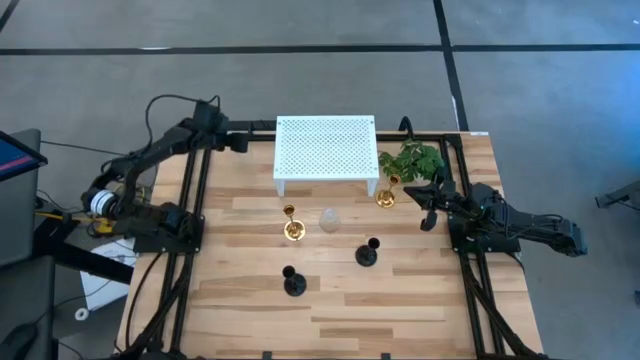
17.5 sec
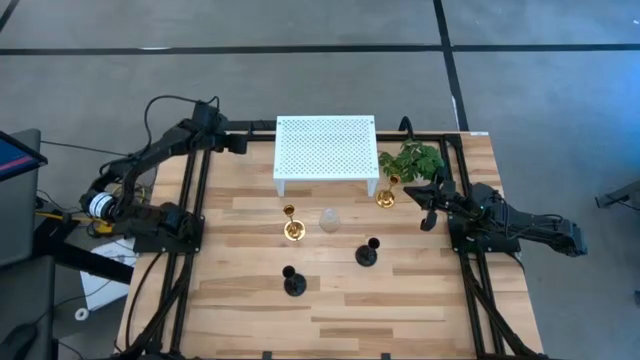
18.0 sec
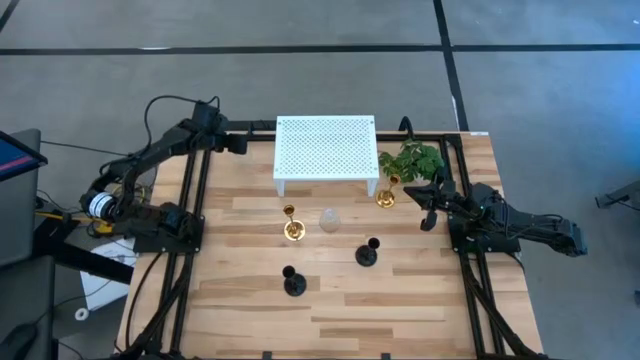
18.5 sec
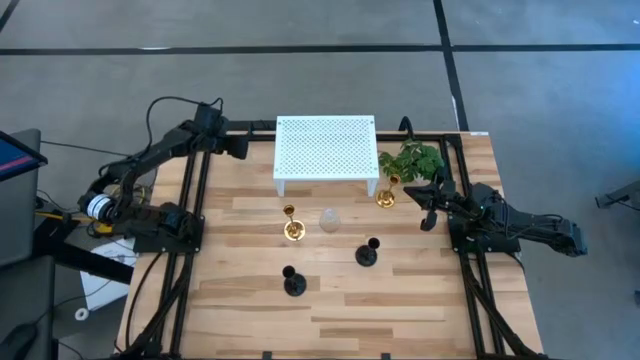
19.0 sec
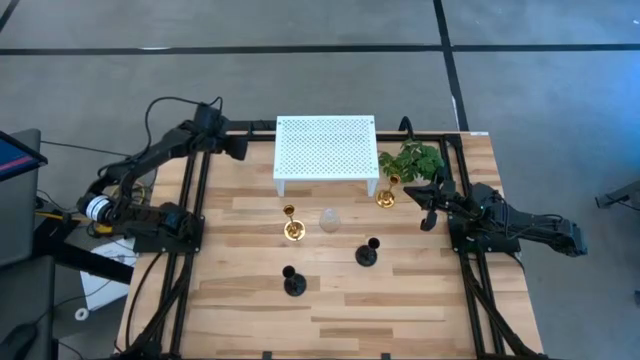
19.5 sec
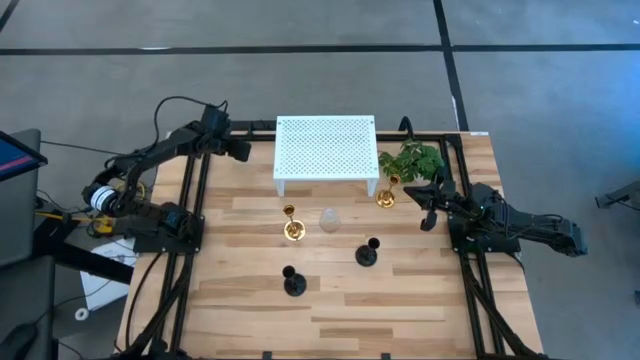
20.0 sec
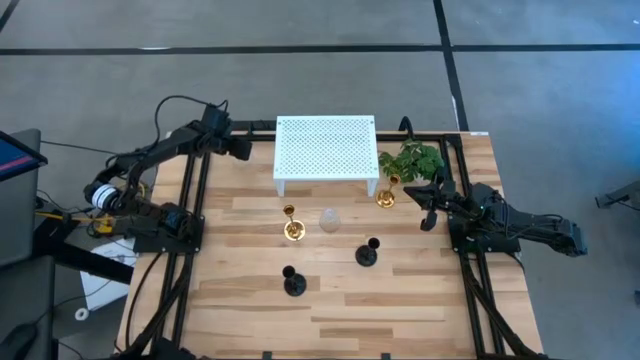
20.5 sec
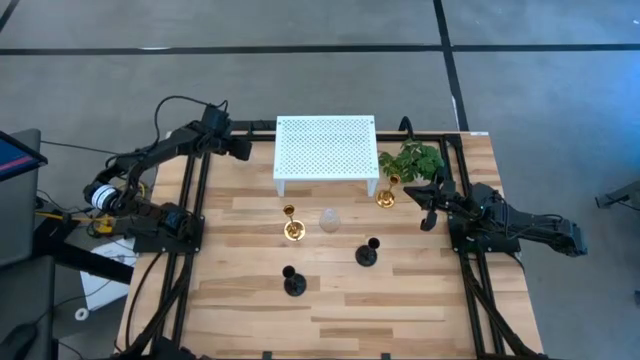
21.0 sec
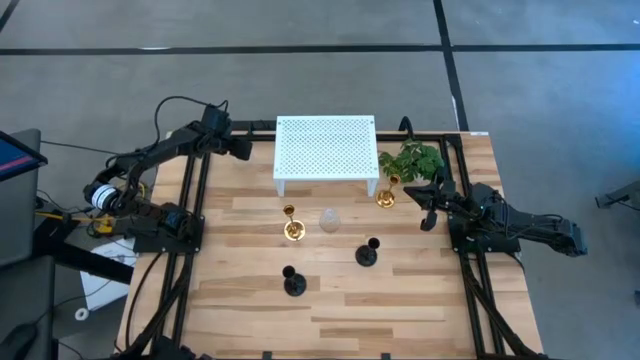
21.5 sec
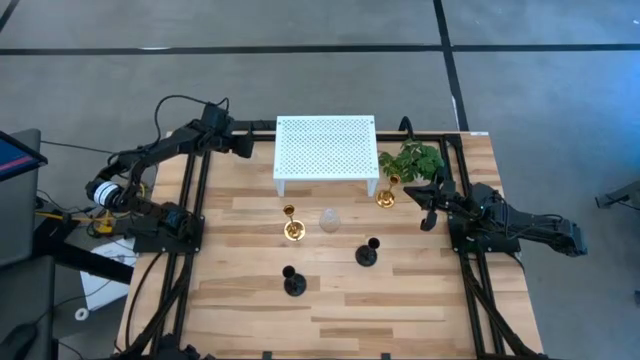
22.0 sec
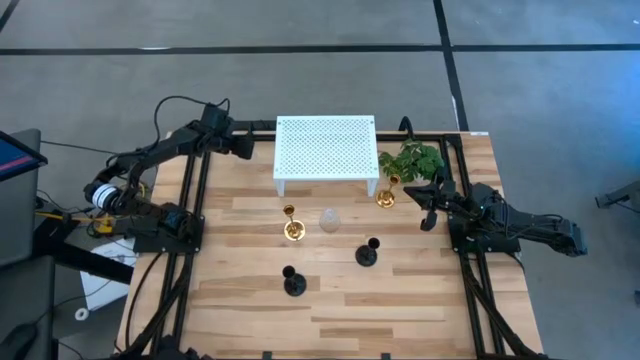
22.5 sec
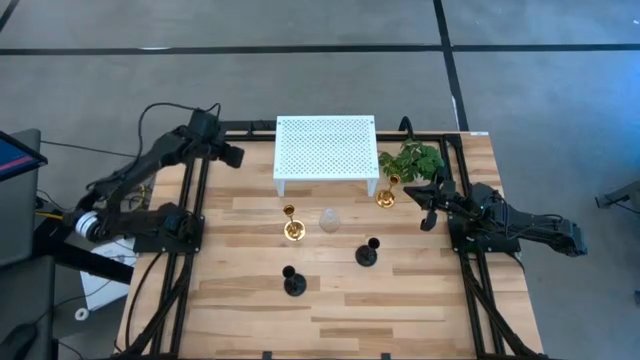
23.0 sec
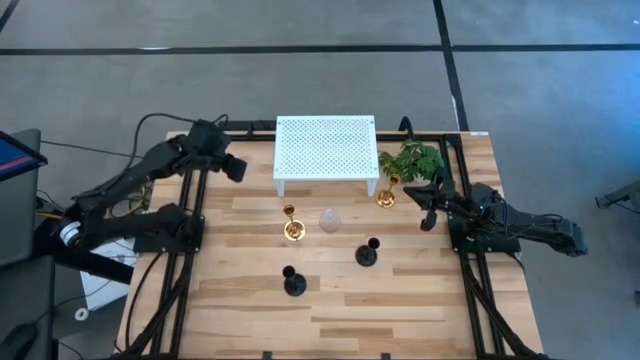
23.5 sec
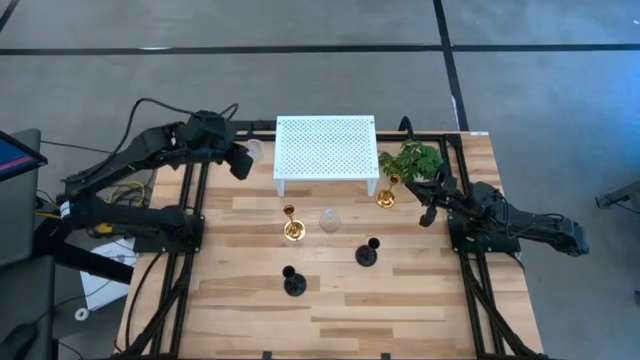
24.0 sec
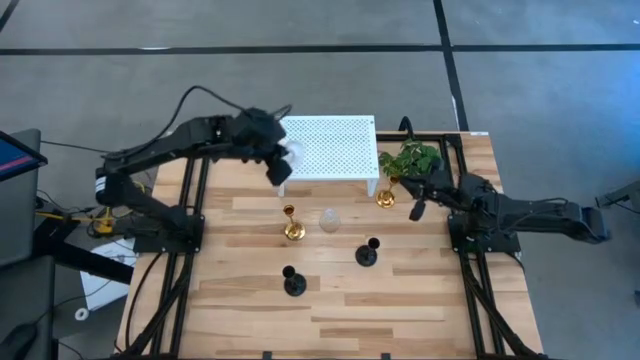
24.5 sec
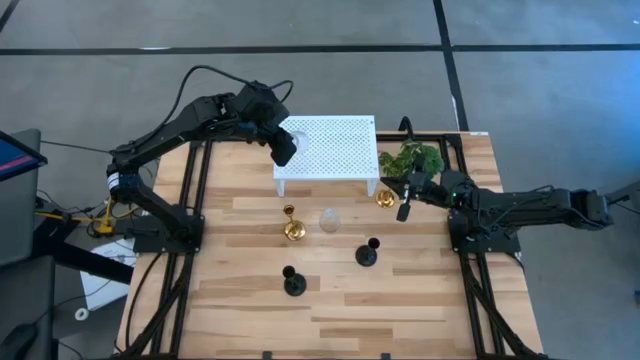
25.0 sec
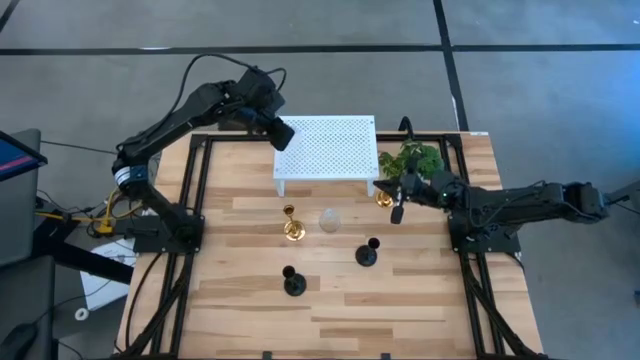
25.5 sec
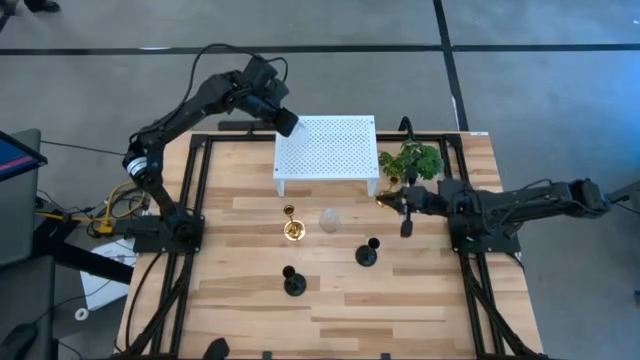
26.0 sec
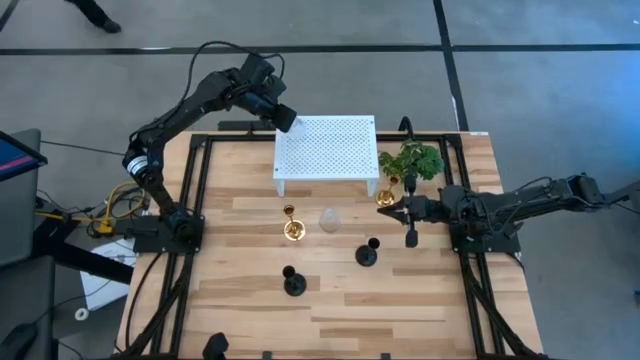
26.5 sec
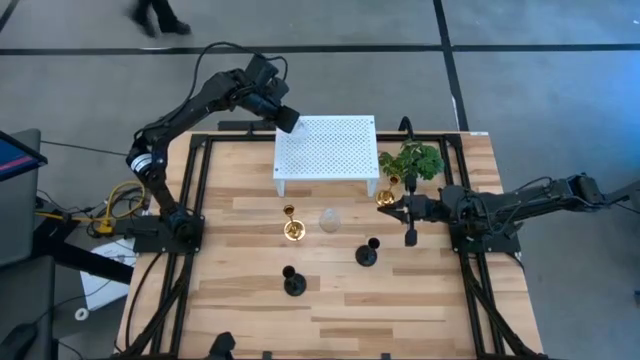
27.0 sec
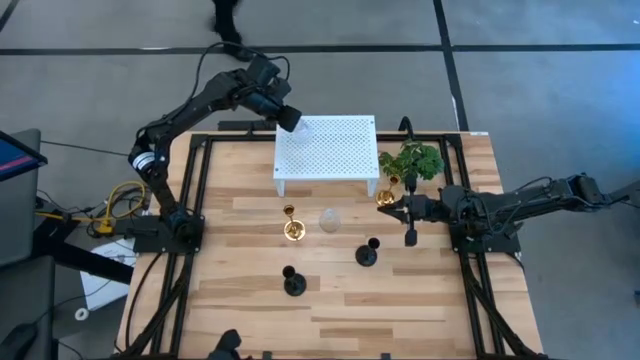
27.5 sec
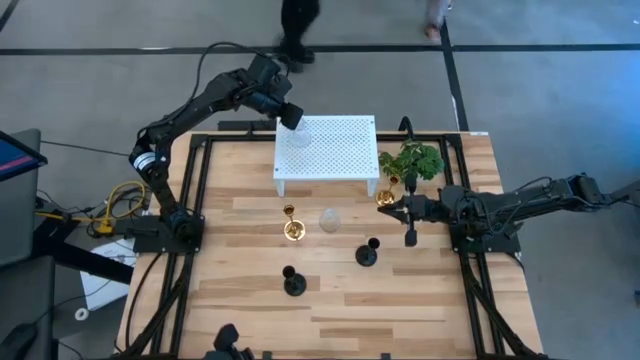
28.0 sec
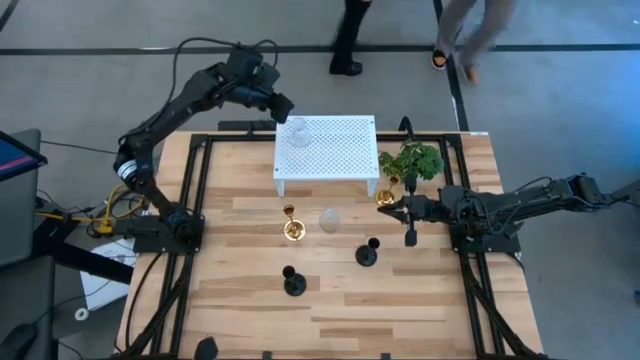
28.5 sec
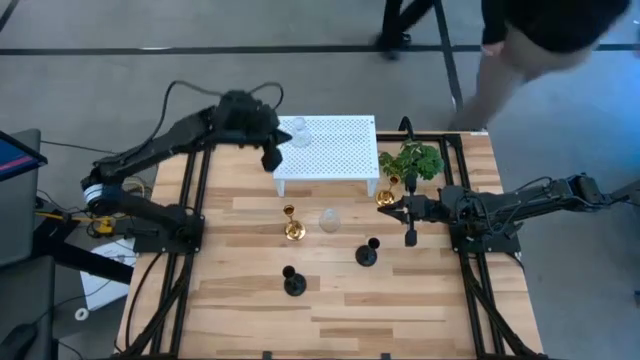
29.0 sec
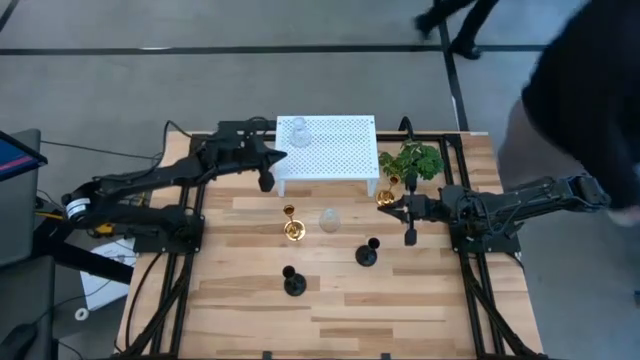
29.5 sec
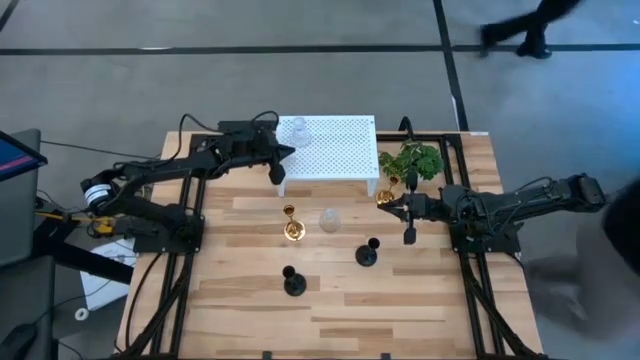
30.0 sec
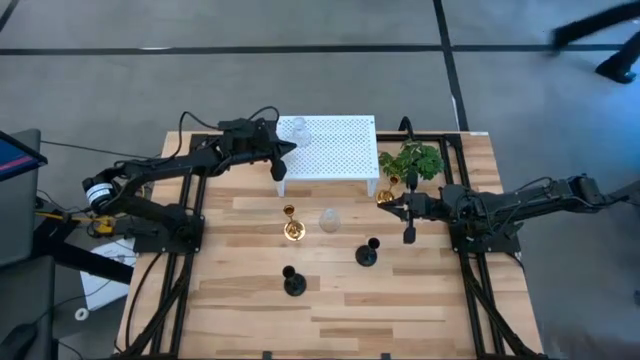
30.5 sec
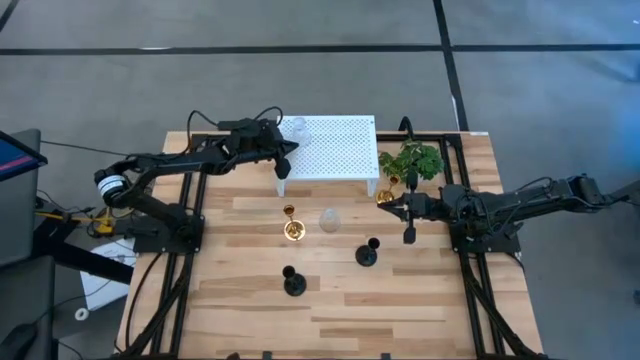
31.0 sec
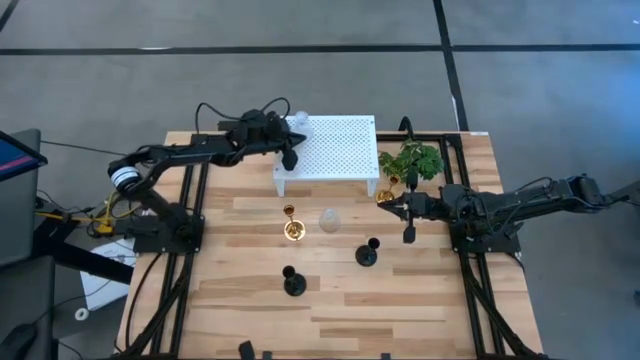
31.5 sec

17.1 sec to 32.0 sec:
Task: Pick & Place candle stick holders
Put the top transparent candle holder on the shelf

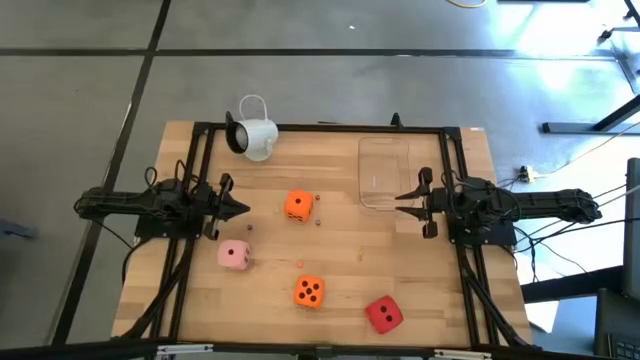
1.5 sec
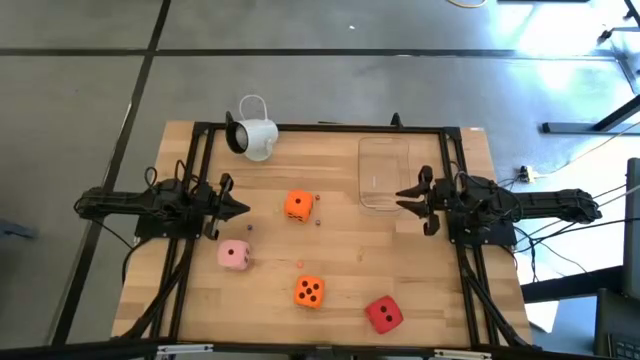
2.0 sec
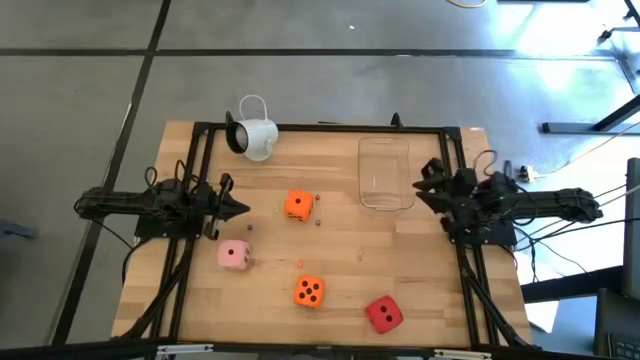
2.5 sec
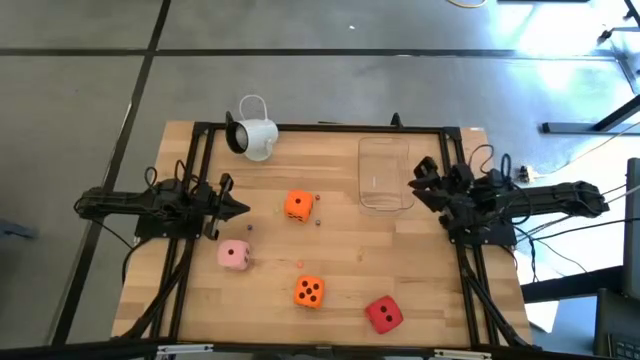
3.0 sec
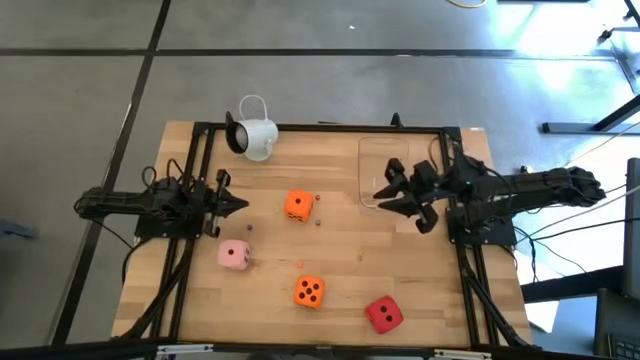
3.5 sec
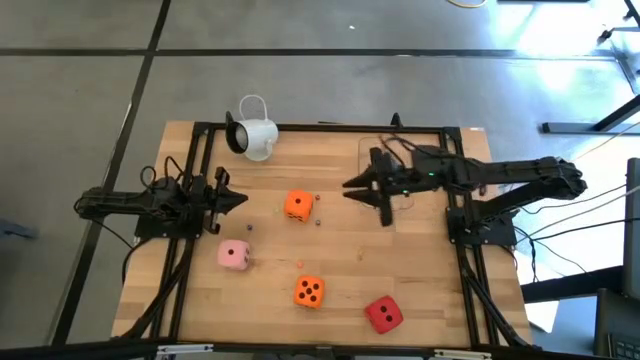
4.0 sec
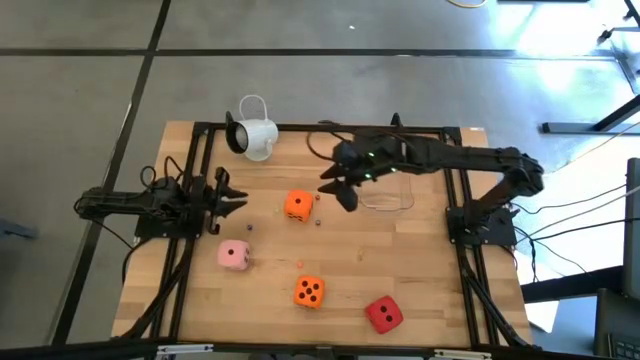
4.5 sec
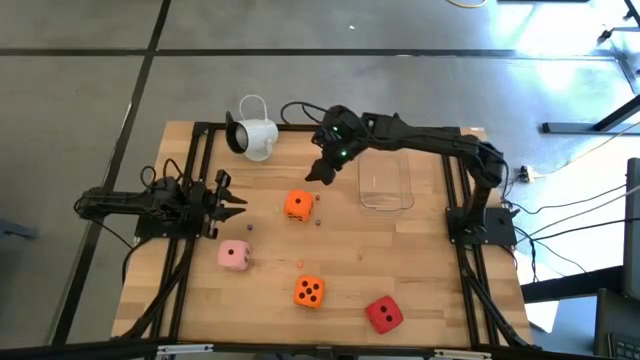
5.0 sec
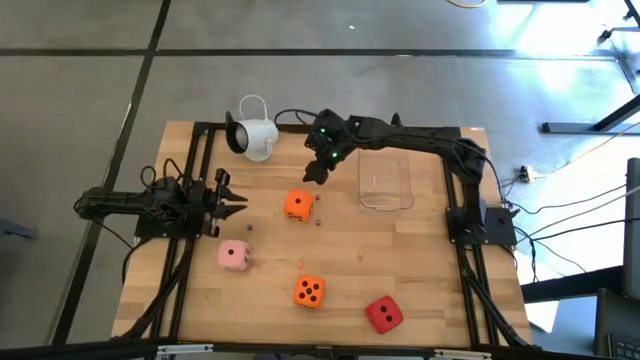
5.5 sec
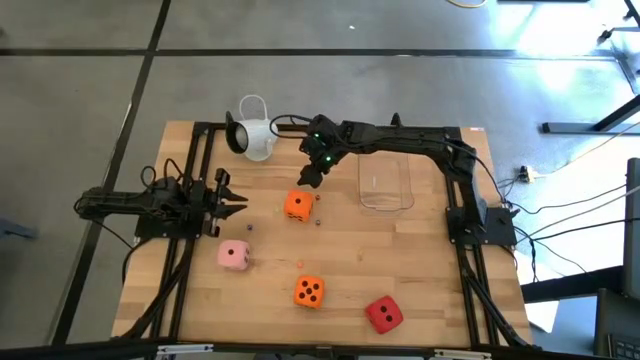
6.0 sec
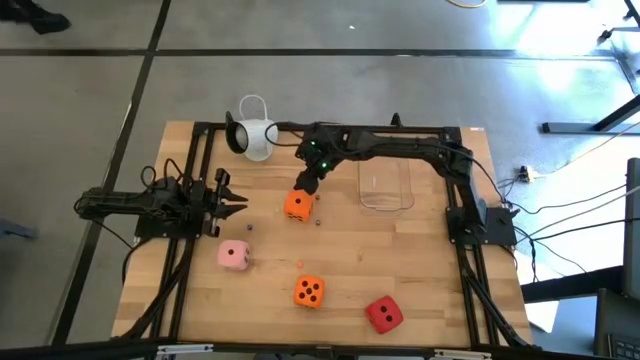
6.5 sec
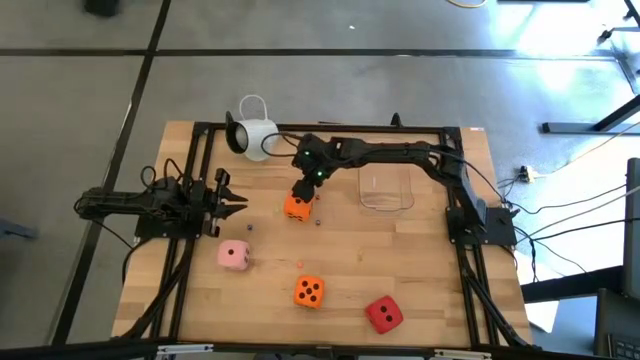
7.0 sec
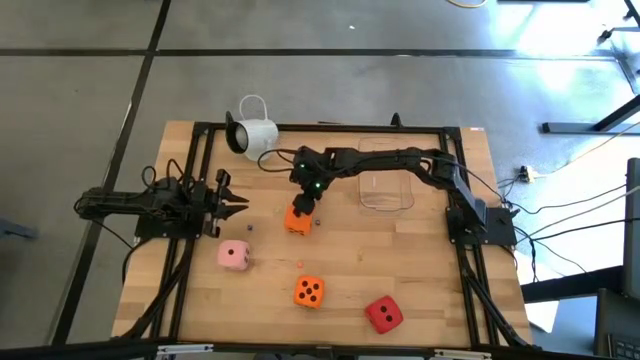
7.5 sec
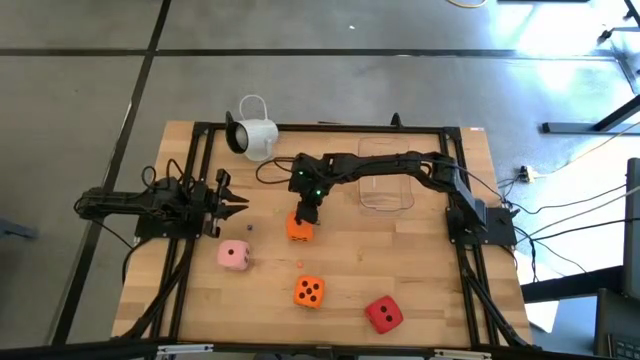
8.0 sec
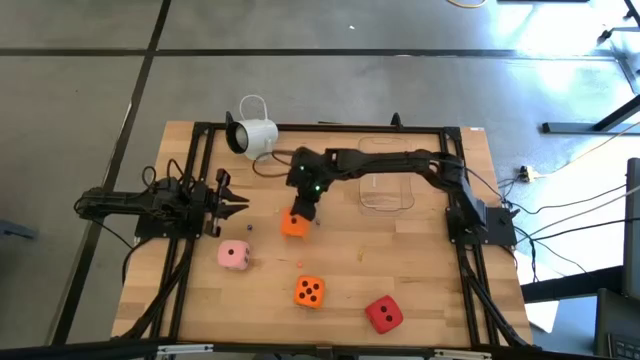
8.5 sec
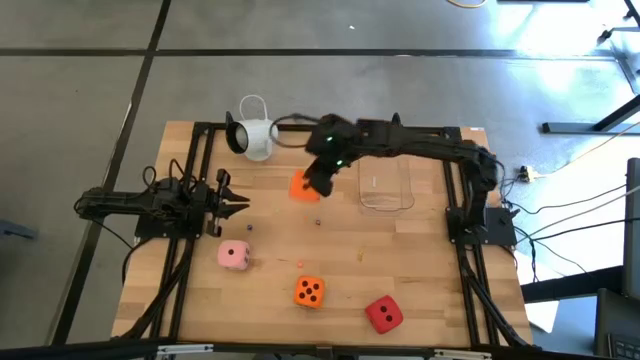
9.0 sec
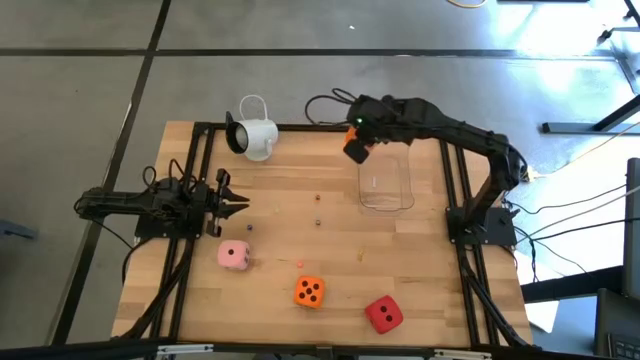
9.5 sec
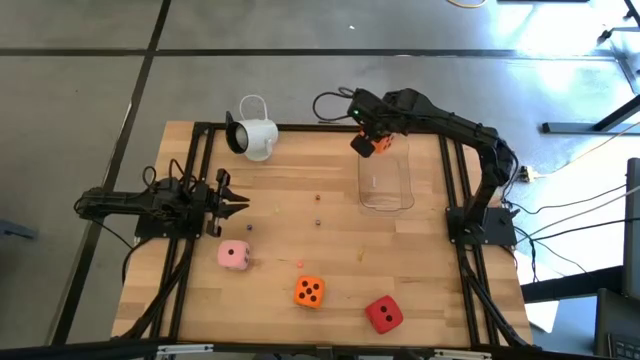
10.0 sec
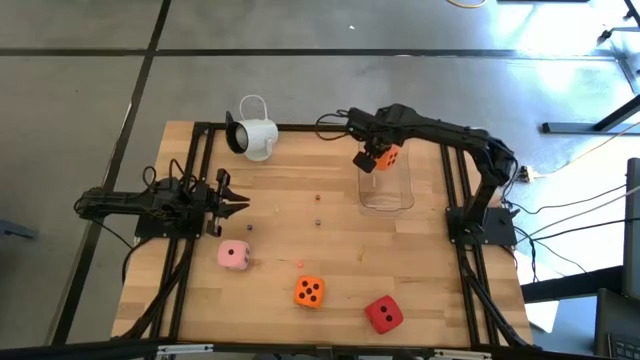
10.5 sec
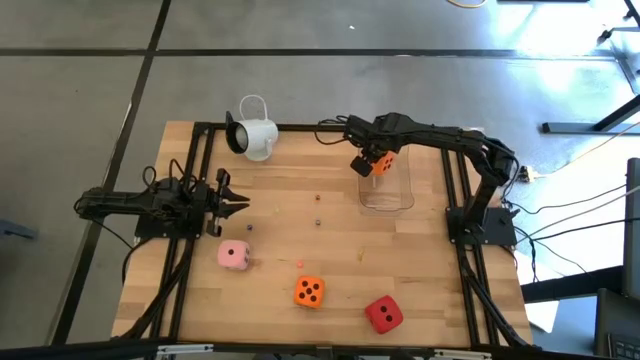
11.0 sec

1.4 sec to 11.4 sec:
Task: Pick & Place Dice
Put the top large orange die into the transparent bin
